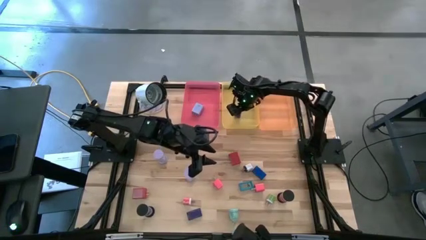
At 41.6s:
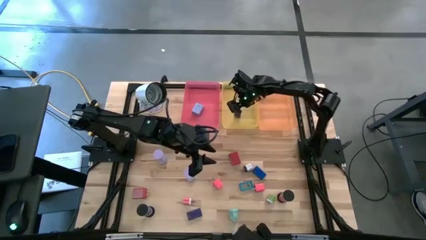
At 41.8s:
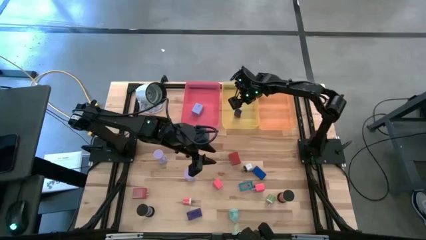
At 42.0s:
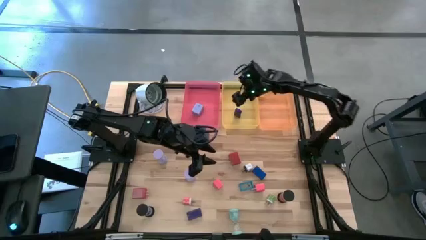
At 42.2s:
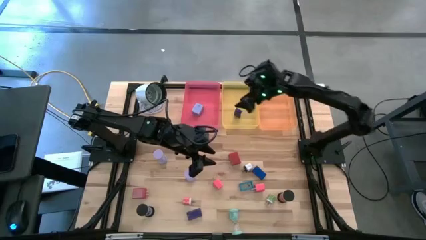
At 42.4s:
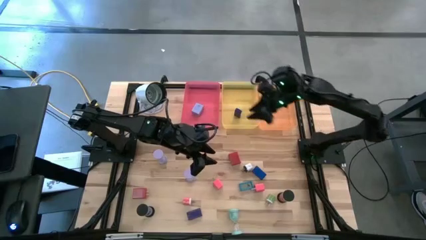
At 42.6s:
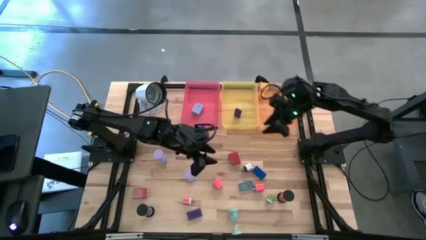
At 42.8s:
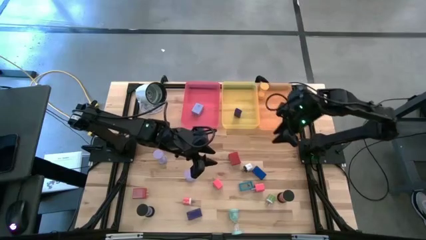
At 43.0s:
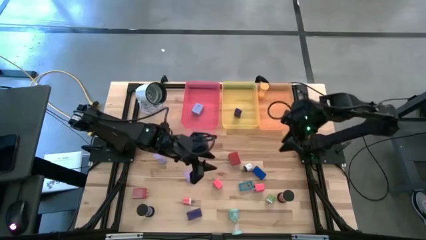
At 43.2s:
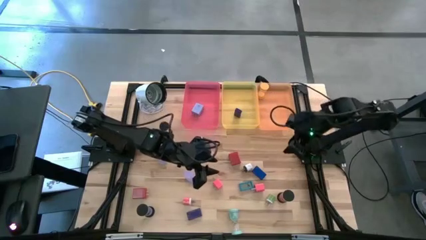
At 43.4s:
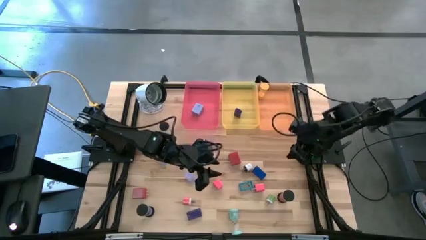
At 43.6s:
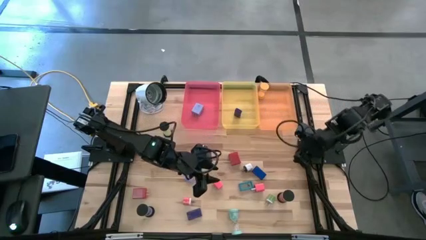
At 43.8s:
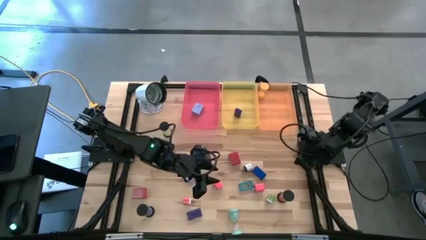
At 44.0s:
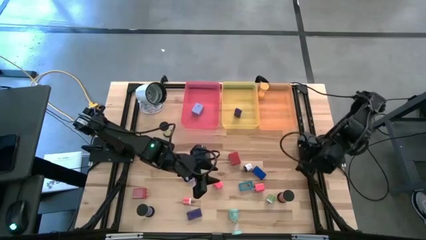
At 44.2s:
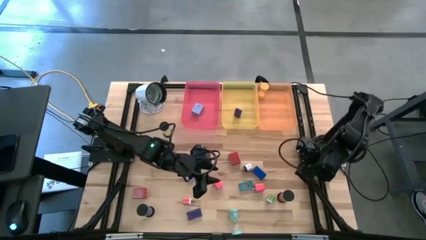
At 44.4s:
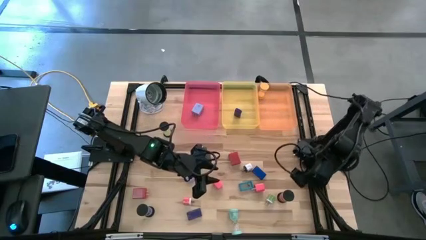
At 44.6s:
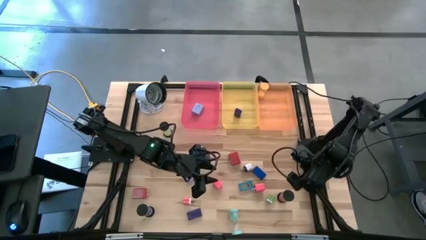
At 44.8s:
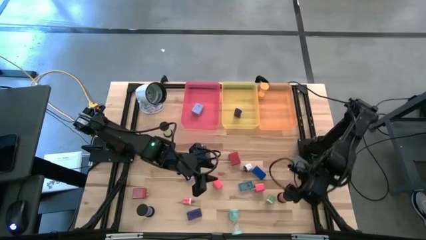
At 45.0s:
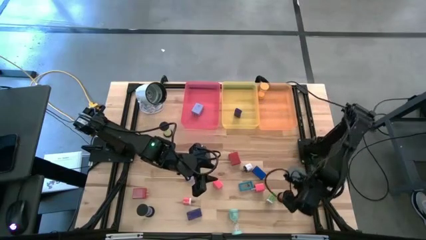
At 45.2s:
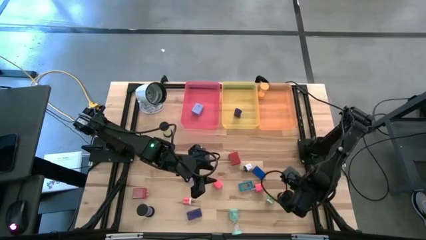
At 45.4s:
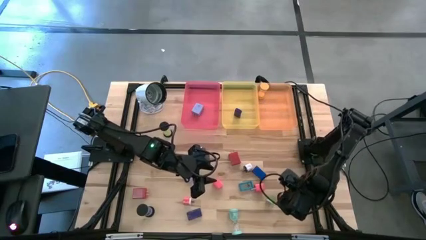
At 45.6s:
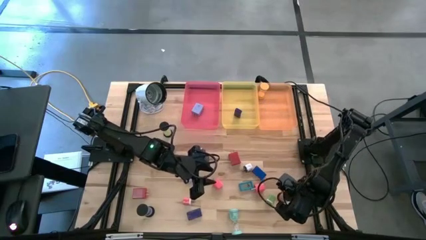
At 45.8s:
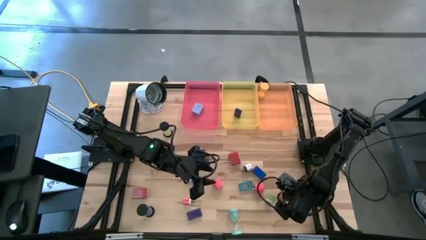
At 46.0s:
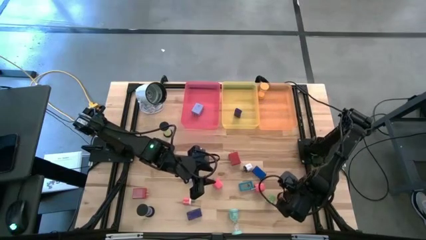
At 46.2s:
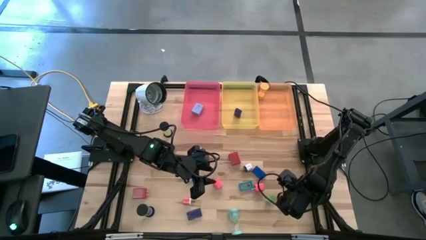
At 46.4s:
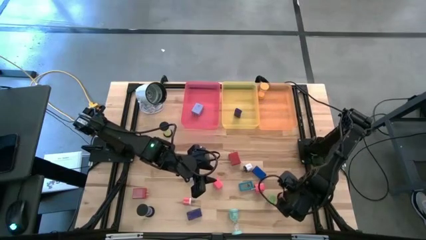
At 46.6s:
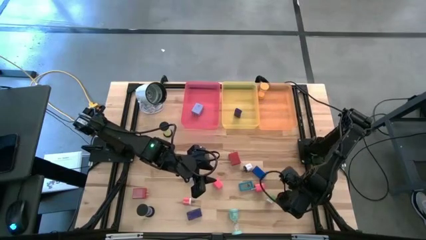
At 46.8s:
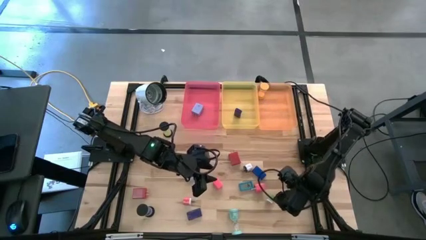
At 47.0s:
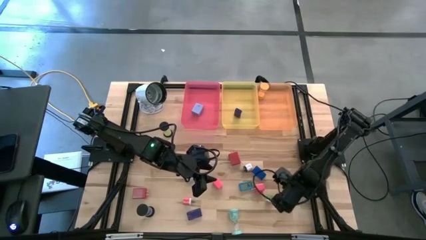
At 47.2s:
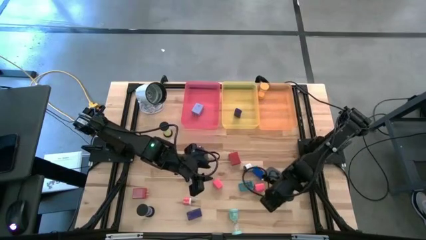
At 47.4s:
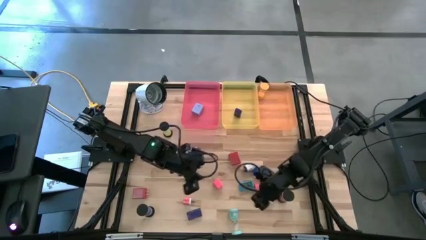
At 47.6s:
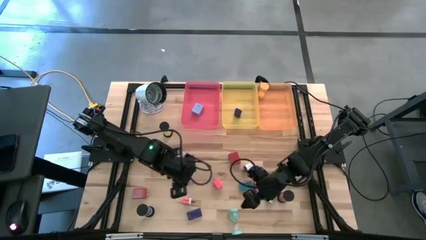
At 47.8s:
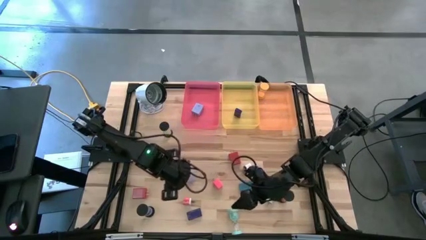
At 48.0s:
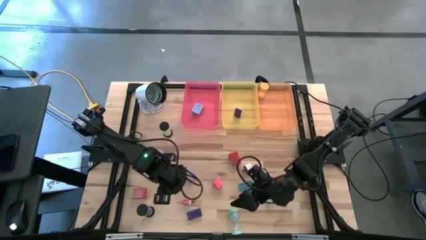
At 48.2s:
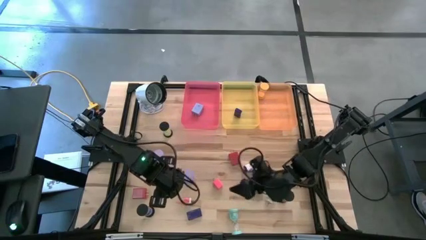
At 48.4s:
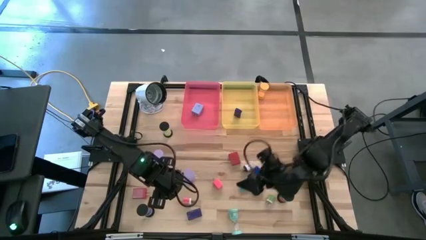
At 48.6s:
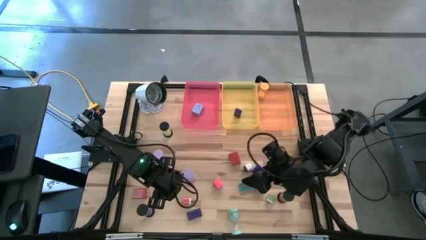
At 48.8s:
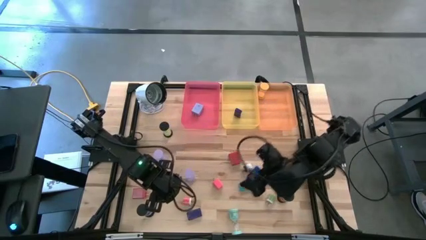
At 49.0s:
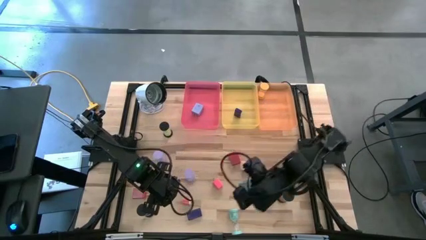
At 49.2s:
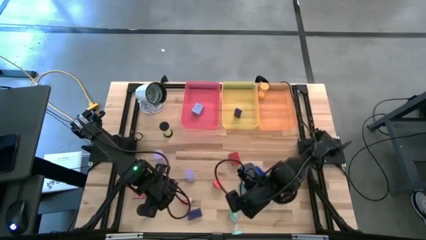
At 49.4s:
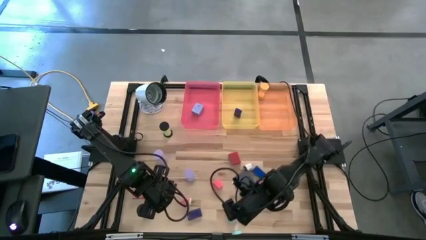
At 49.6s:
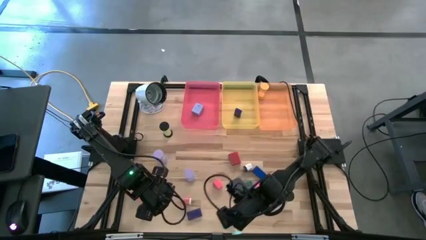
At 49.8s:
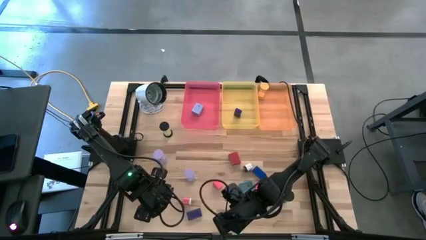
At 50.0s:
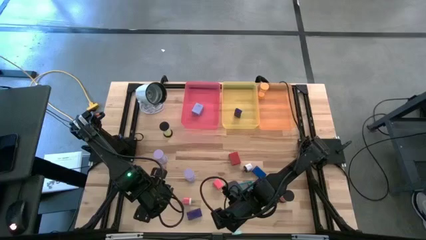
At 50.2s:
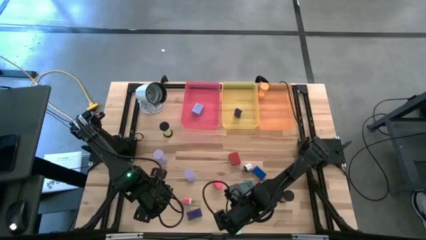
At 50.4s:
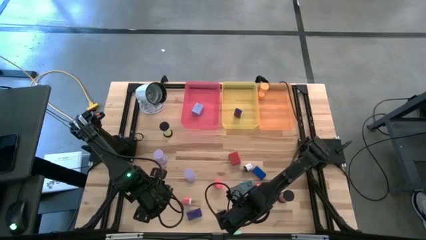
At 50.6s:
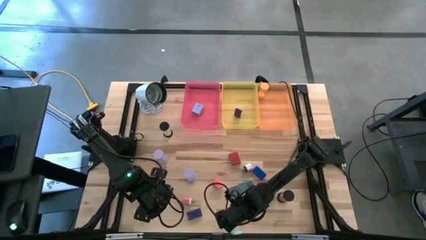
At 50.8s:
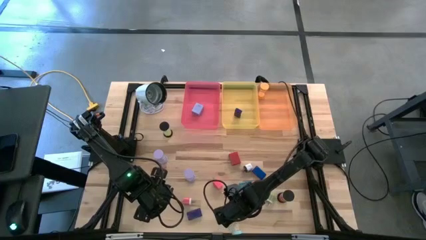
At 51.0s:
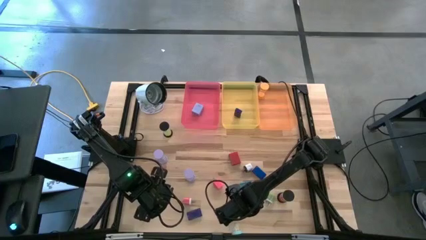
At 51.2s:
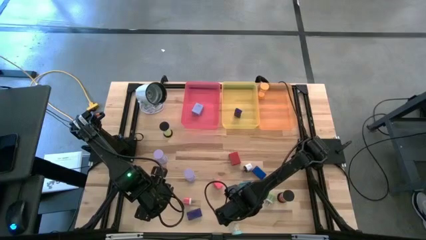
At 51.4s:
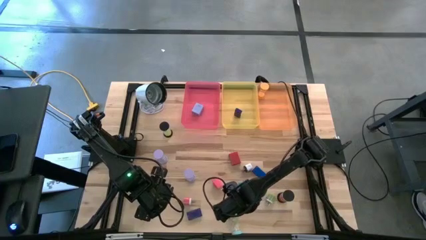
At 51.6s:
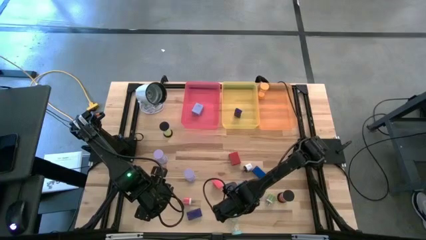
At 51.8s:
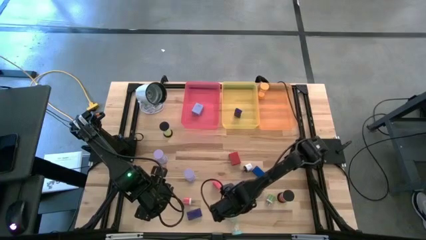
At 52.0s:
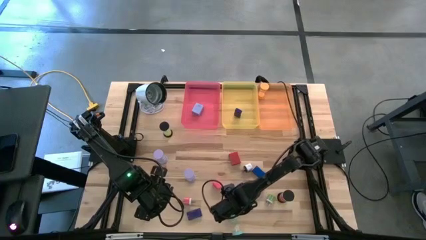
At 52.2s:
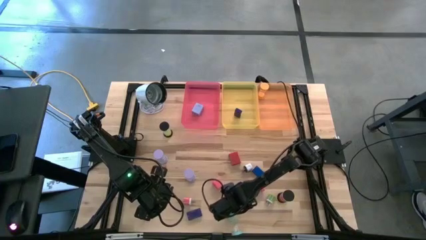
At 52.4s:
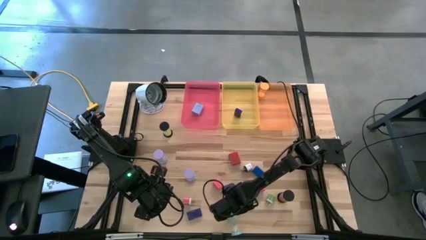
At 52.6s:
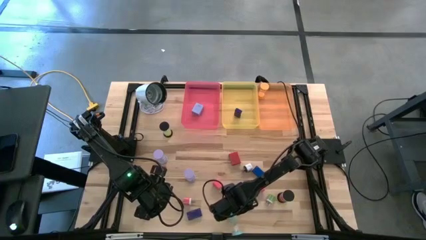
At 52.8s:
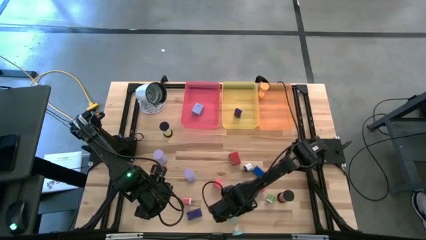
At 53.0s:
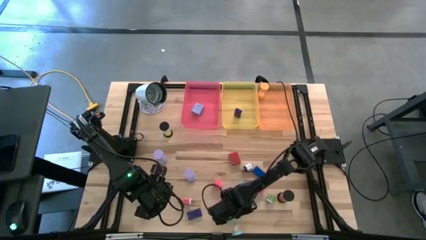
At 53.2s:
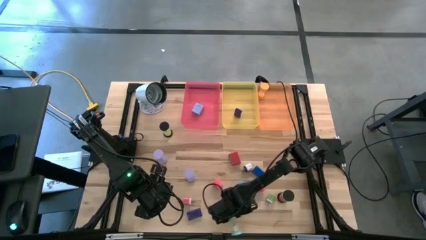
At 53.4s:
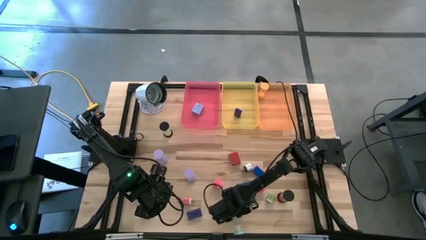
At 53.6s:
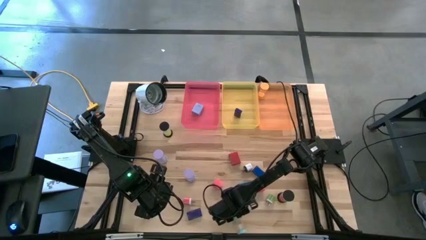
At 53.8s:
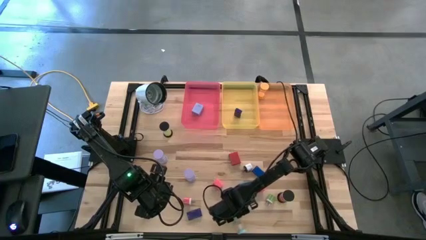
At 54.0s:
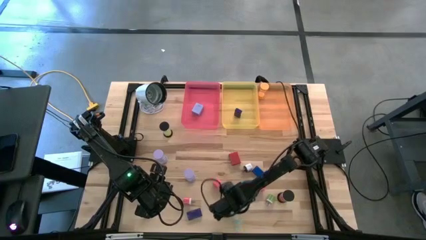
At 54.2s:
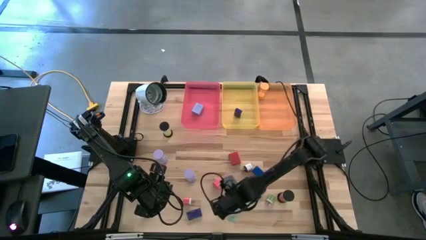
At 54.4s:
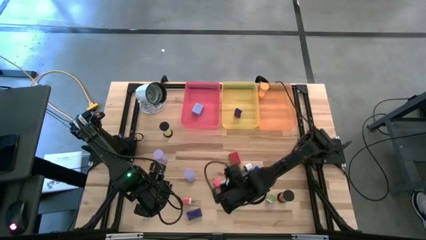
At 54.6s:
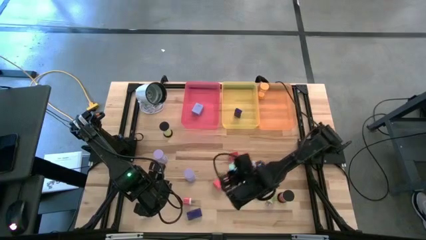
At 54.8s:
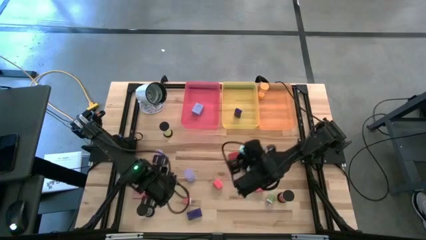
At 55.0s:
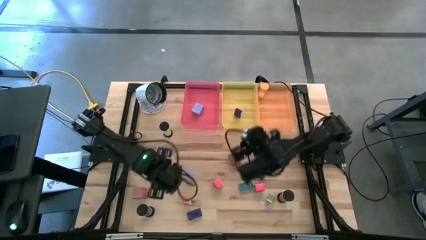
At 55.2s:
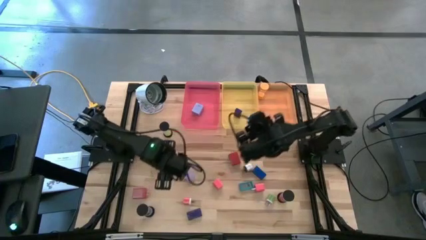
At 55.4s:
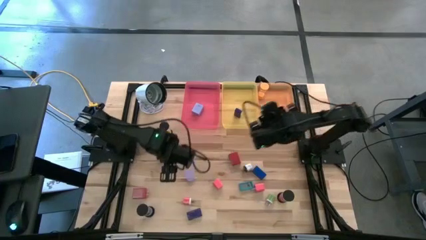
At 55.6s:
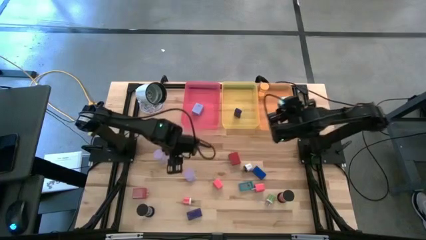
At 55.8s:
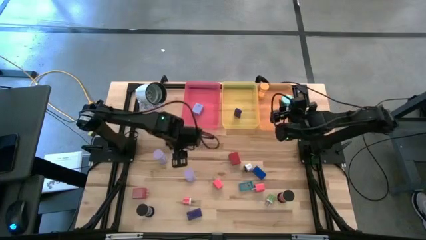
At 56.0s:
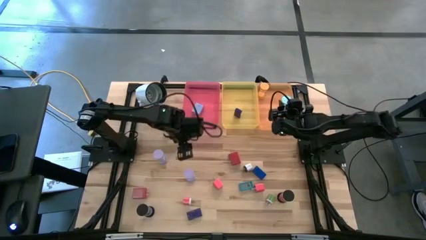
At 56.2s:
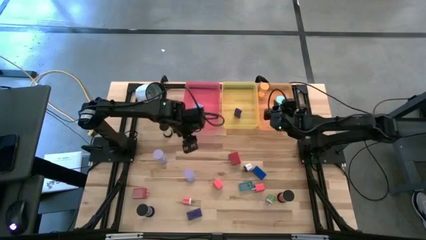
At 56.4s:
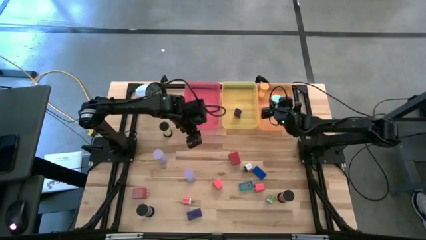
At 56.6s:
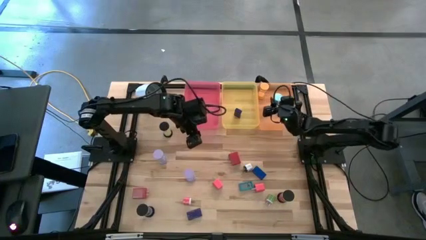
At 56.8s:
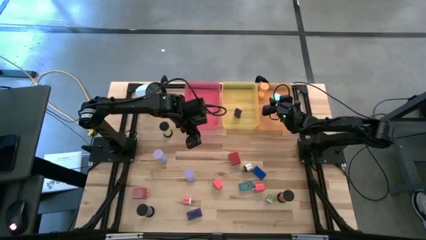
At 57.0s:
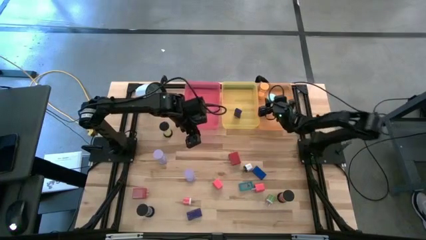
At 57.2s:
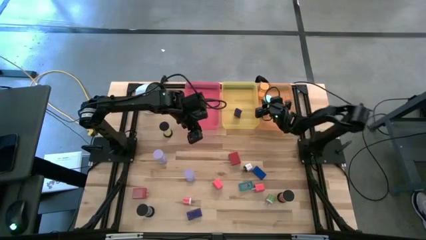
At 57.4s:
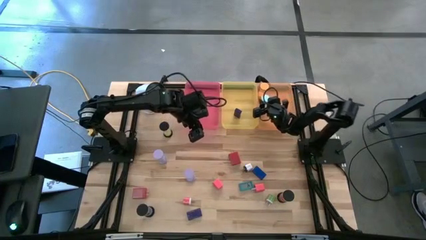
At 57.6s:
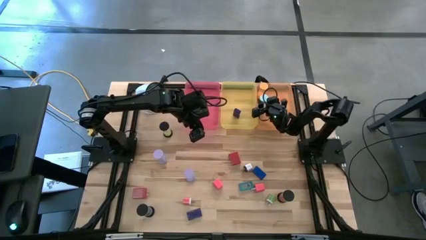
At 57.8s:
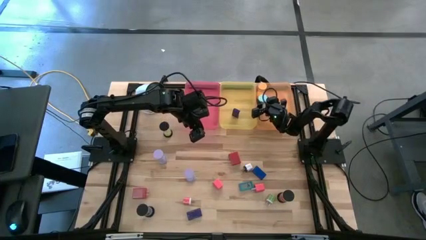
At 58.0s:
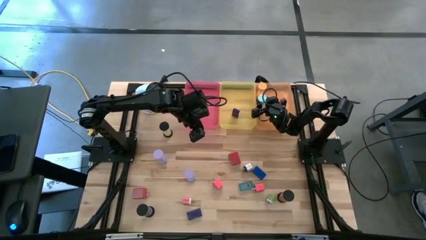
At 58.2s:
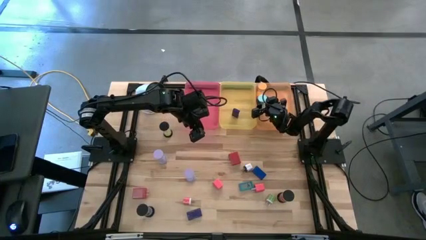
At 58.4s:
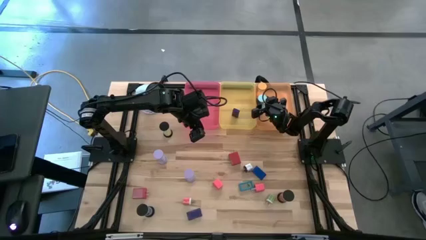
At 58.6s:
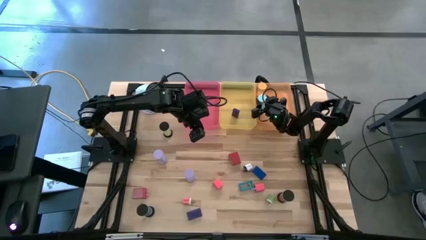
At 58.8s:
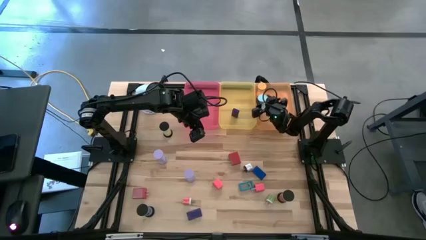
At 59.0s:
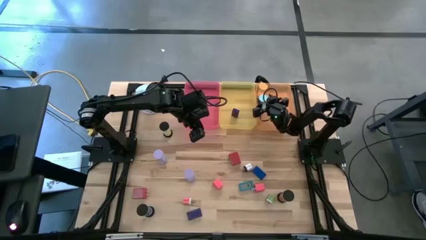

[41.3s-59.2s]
Task: Pick & Place Office items
Put the light blue hourglass into the orange bin
